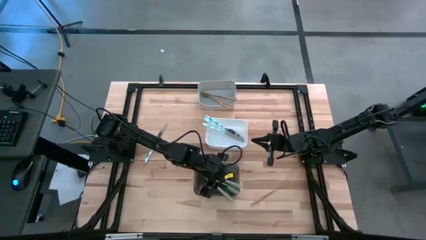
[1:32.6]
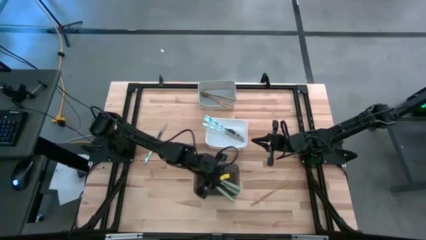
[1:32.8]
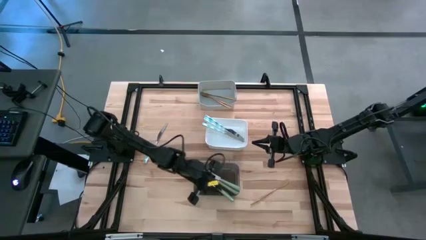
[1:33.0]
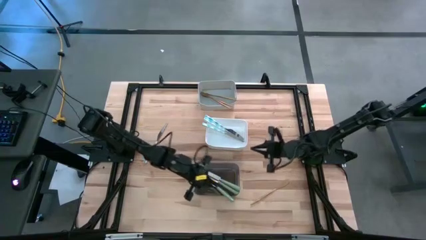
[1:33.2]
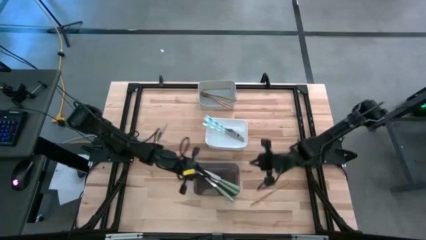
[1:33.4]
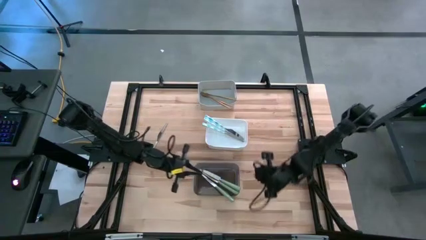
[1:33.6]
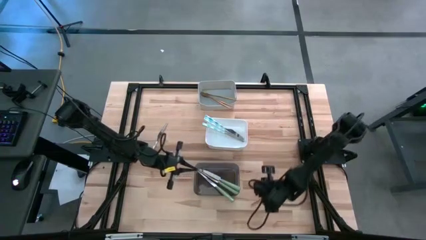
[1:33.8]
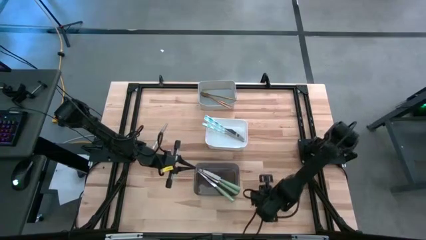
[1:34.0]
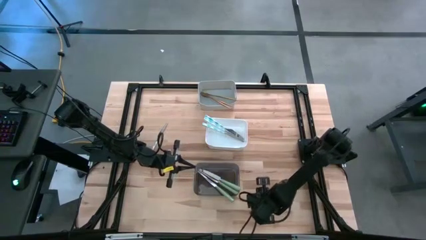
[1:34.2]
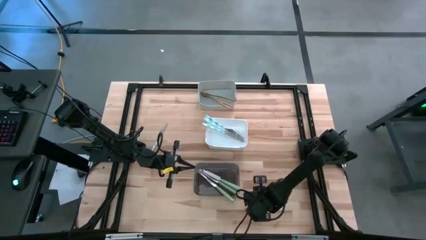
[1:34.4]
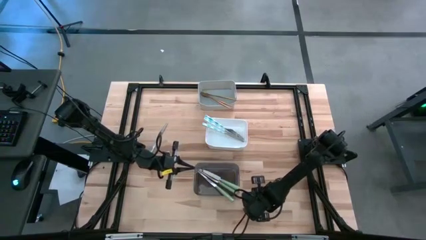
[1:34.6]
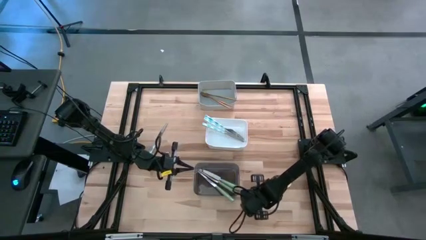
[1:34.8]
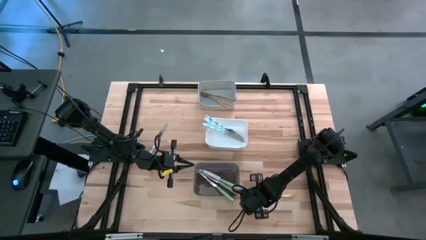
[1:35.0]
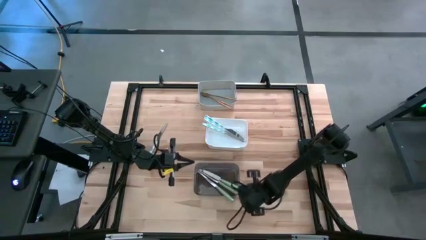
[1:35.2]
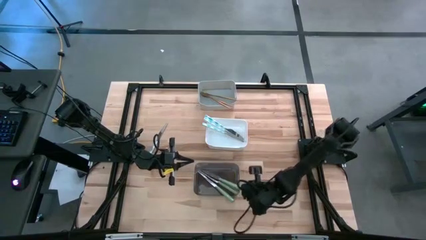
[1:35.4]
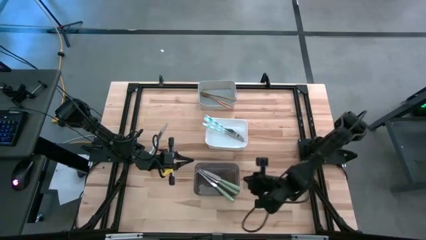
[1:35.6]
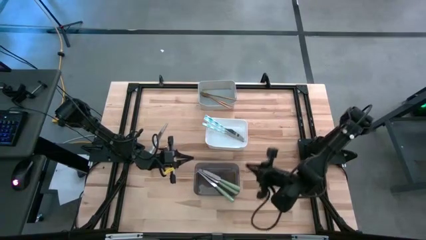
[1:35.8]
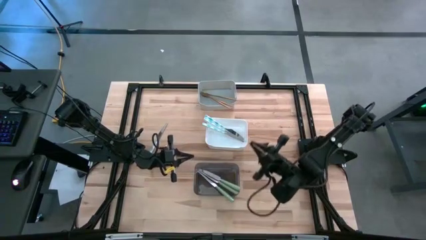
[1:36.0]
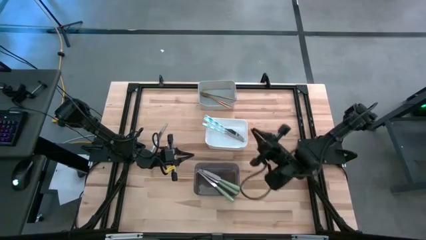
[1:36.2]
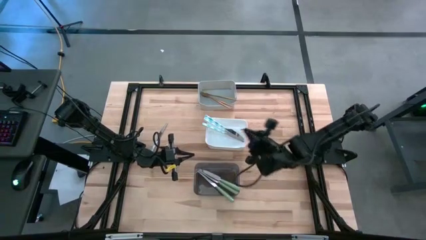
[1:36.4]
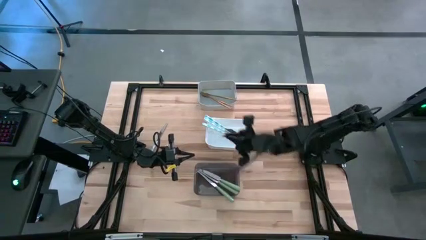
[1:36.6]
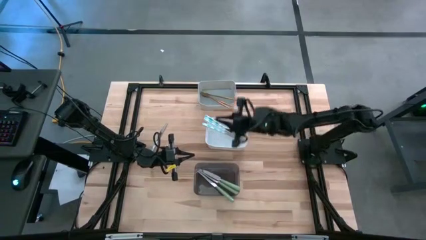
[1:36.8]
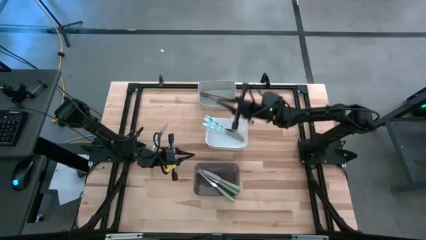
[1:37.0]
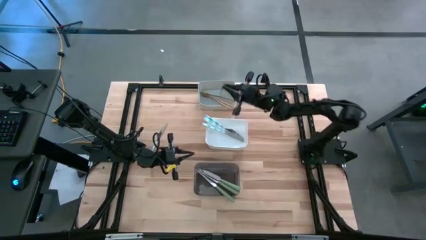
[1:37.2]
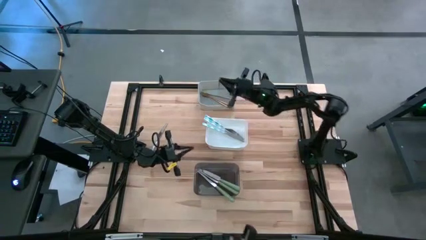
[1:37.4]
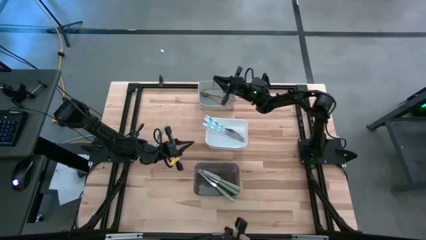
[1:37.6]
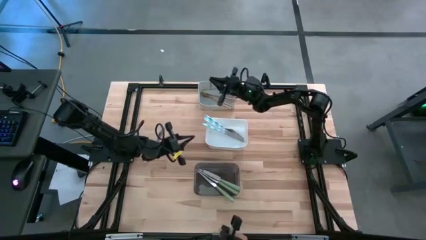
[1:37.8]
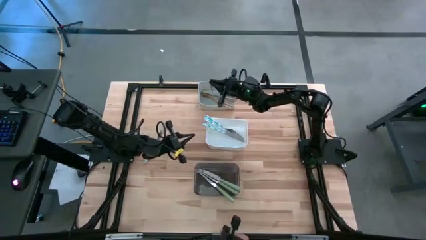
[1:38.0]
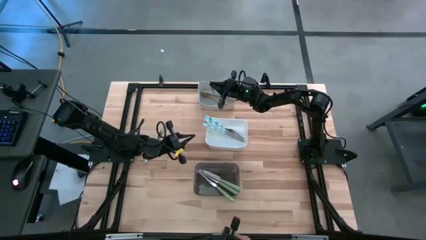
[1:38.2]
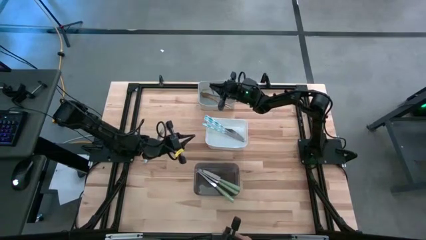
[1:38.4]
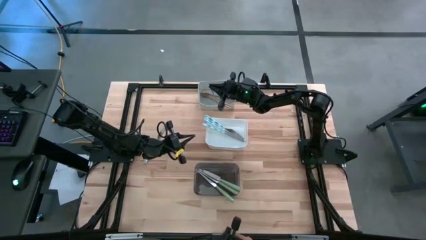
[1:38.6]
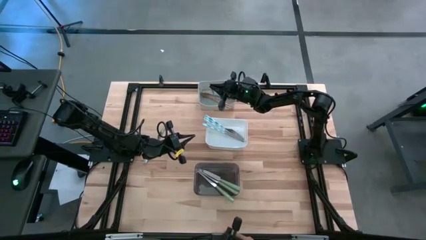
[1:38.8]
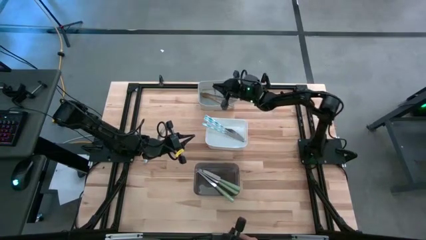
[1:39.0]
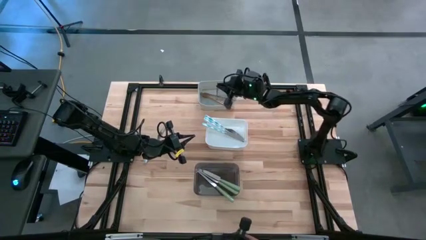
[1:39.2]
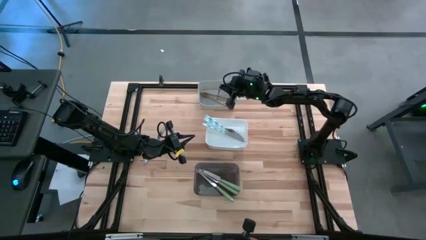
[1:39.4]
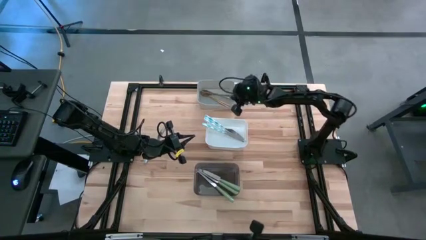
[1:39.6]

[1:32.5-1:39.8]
Task: Sort silverware by color (type)
Put the gold table knife into the gray bin

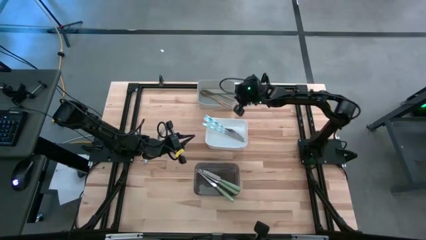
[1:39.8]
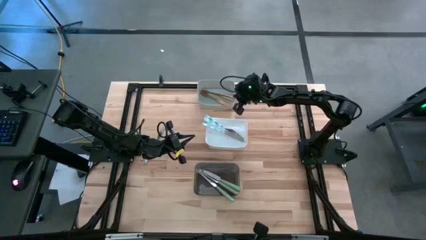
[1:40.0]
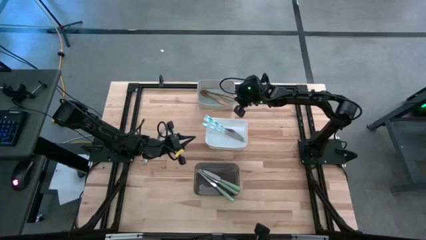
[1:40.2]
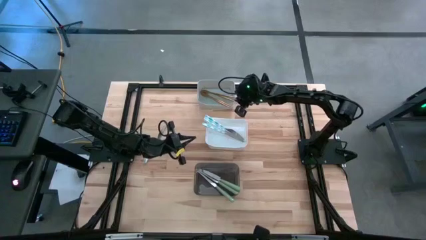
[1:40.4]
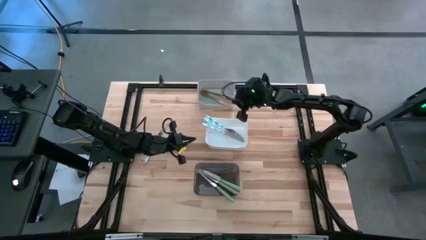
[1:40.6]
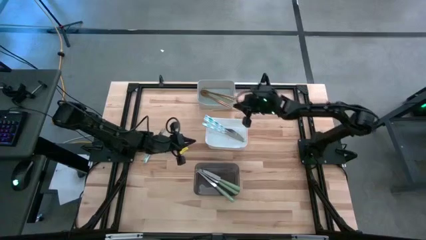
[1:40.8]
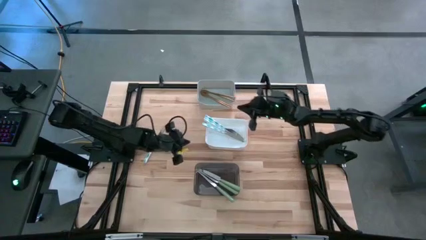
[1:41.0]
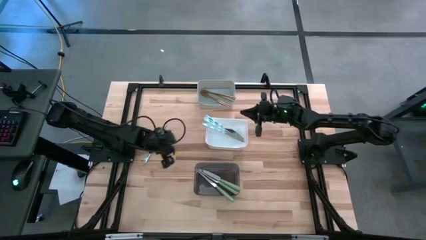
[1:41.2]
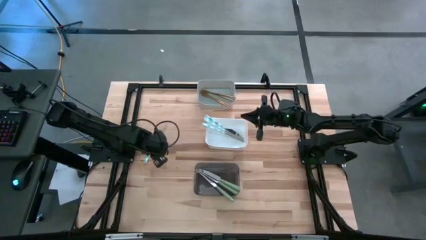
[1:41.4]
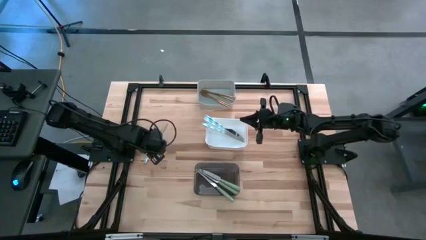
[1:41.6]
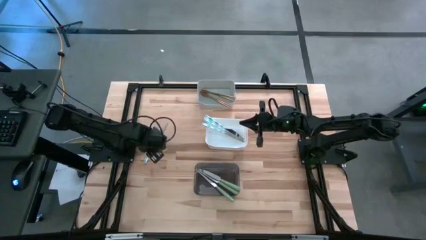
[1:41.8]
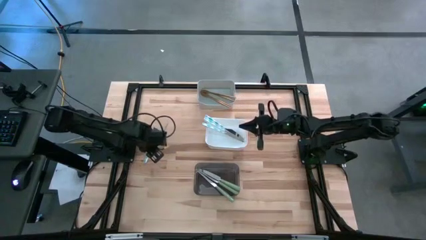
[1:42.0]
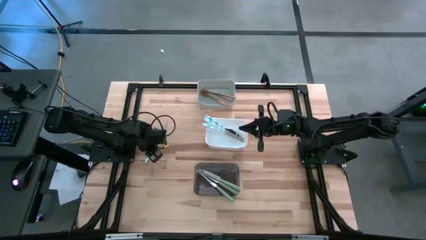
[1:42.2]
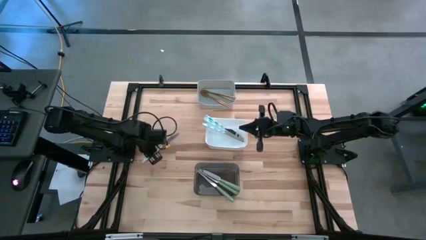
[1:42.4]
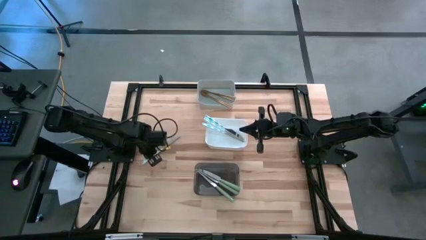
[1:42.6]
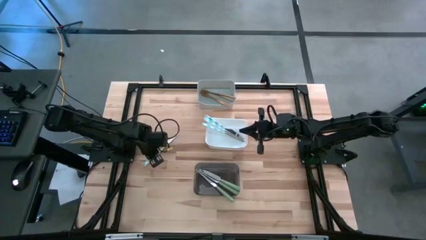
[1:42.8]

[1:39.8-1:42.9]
Put the white-blue table knife into the white bin

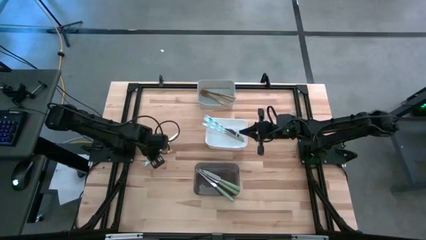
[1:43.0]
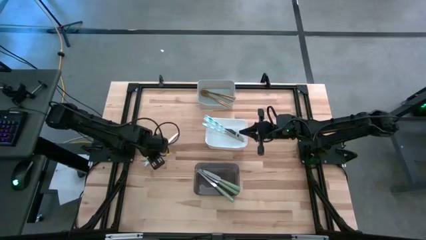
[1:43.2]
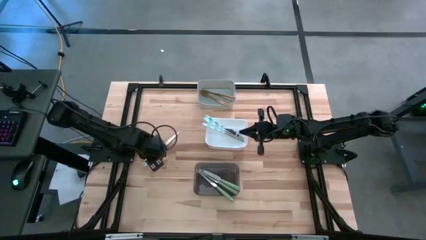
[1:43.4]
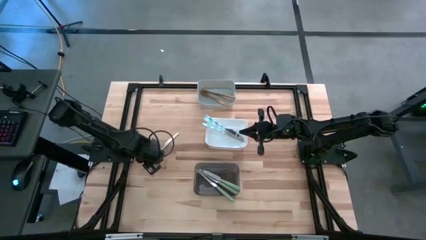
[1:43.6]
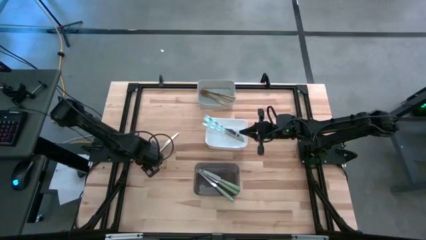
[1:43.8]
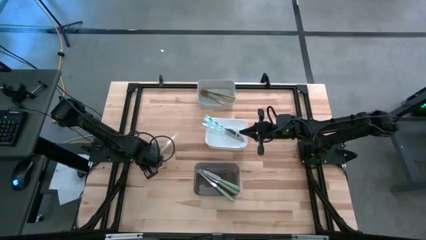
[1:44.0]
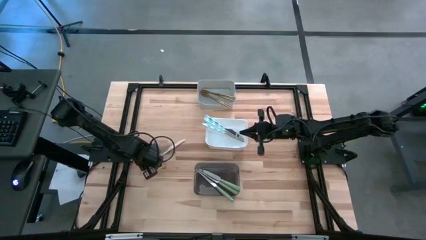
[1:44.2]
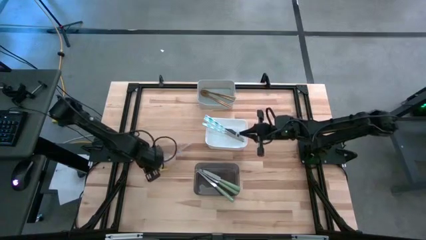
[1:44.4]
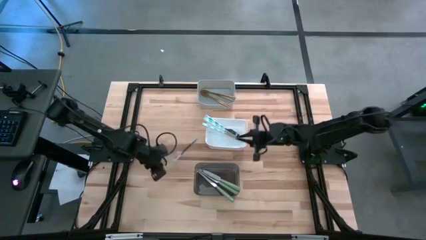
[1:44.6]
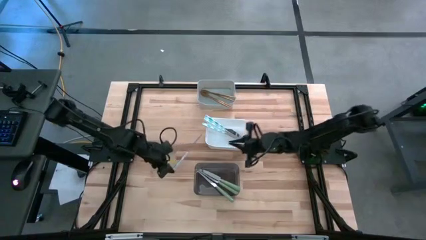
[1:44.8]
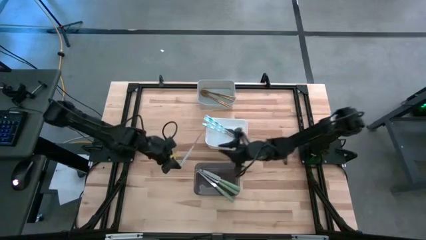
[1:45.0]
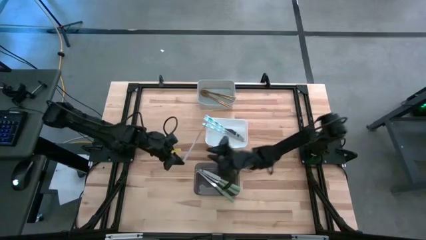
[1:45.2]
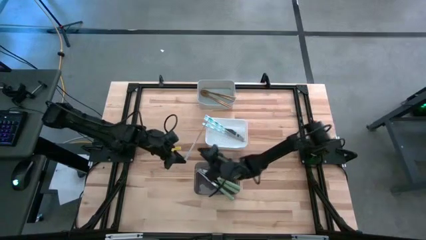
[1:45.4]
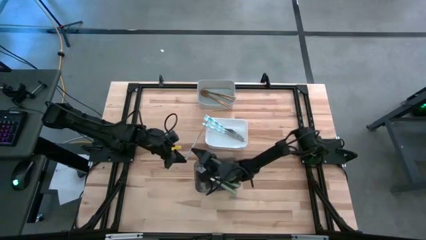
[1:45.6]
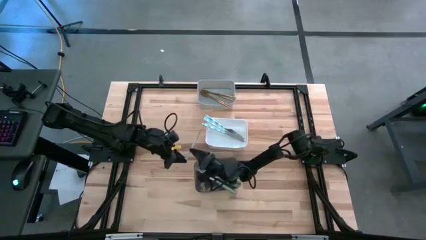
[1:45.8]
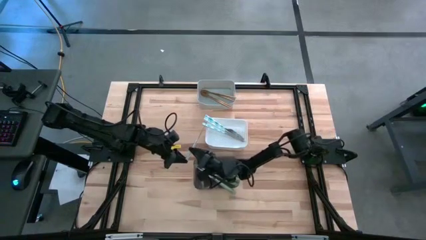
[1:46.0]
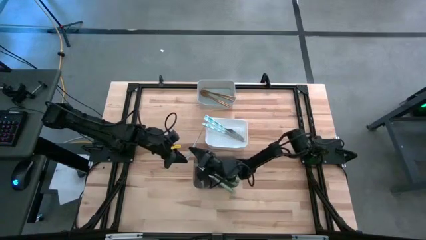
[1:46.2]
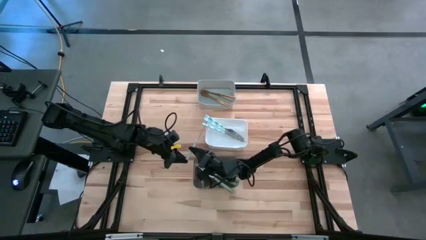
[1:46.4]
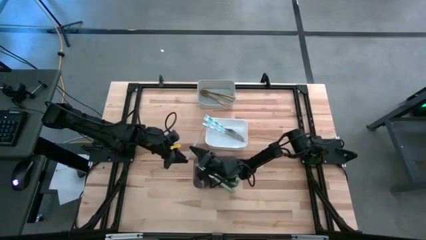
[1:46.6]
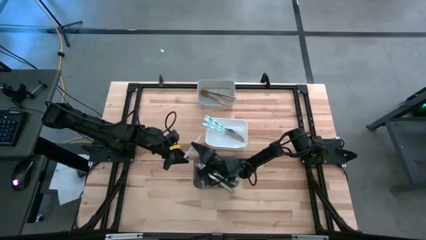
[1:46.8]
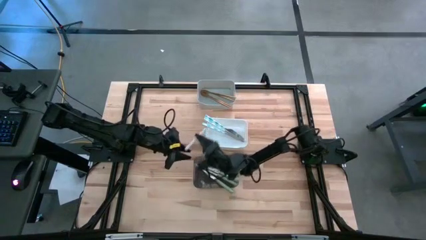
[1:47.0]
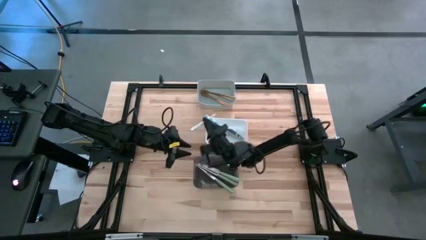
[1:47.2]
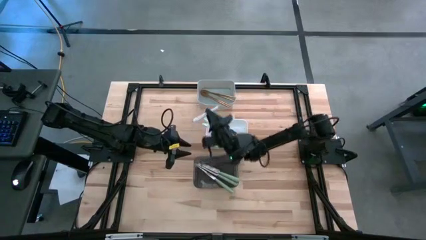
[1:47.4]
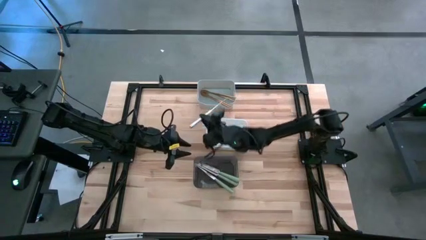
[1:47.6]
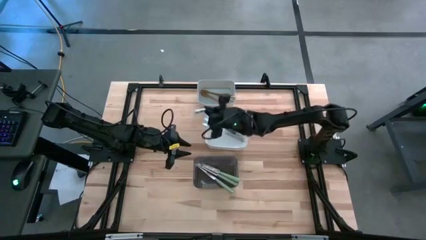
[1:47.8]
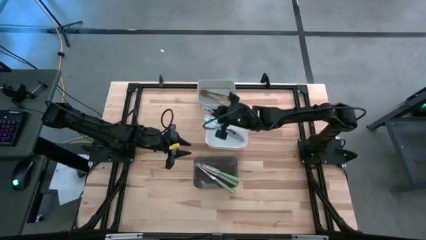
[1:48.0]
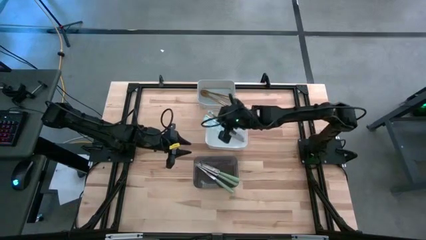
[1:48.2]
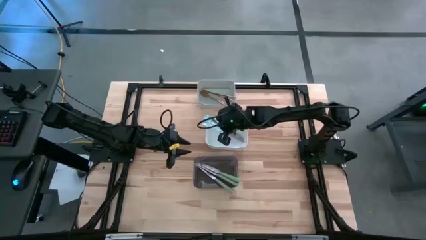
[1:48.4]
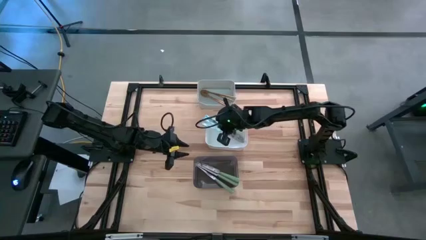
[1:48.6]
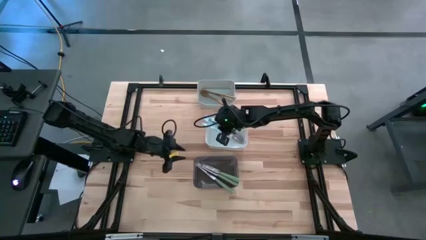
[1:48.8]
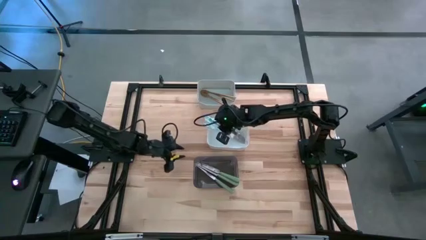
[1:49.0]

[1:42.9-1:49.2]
Put the white-blue table knife into the white bin

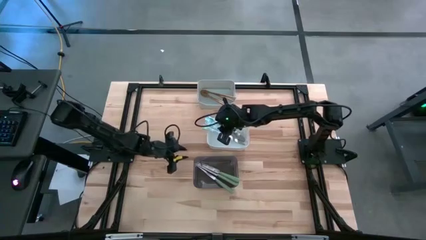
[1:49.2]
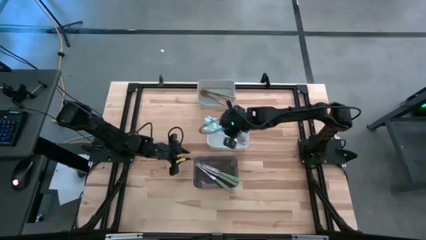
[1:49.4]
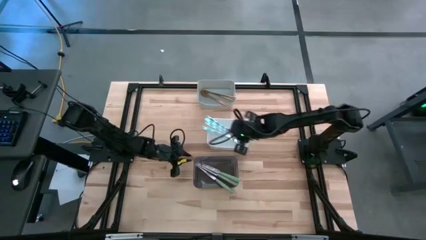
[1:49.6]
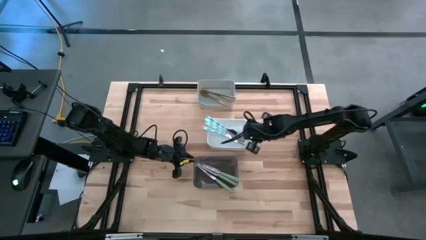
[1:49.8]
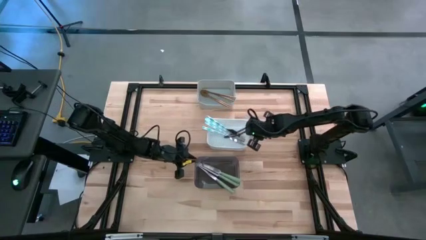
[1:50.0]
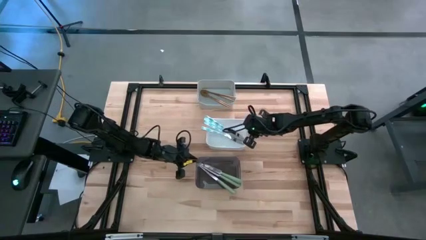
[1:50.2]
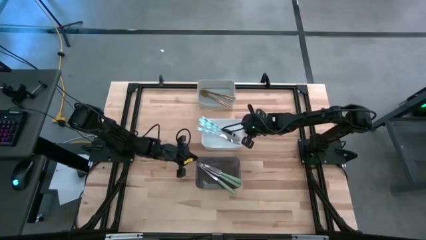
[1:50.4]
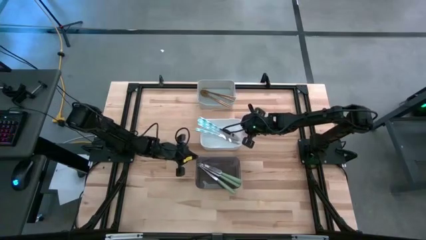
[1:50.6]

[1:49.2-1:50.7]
Adjust the white bin
